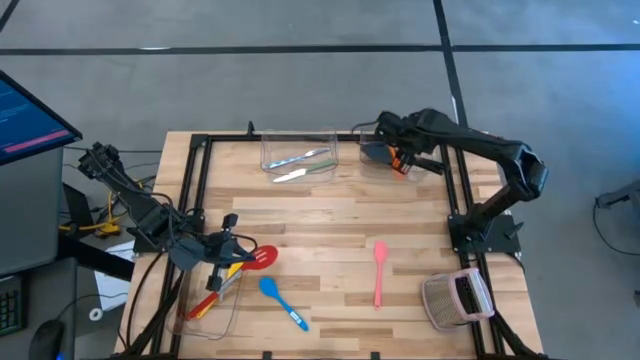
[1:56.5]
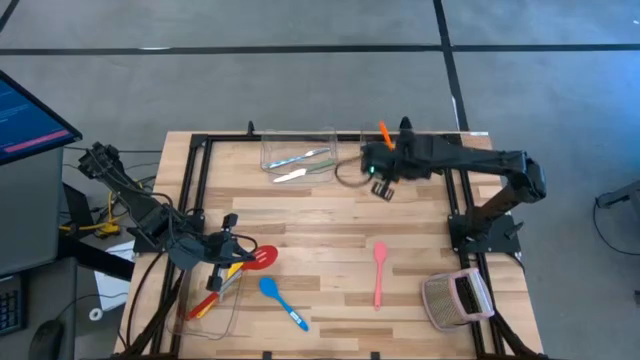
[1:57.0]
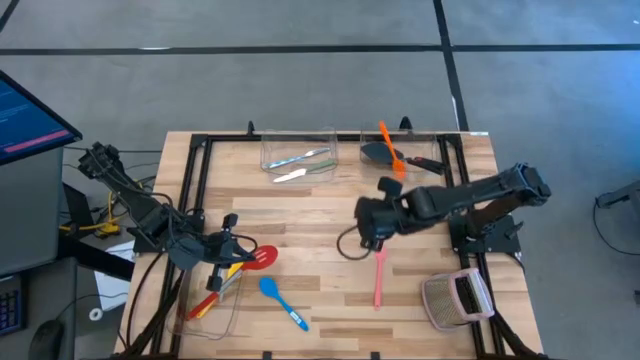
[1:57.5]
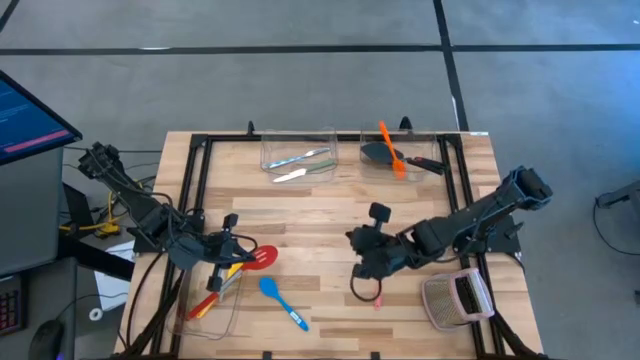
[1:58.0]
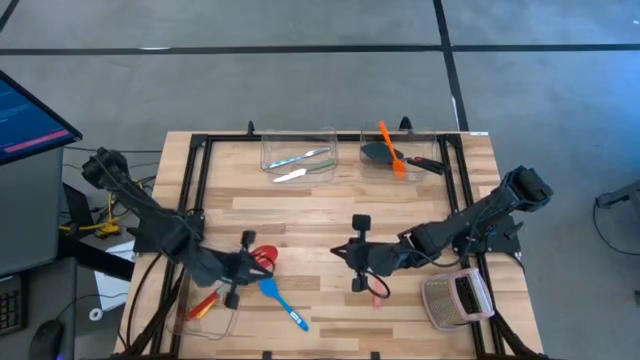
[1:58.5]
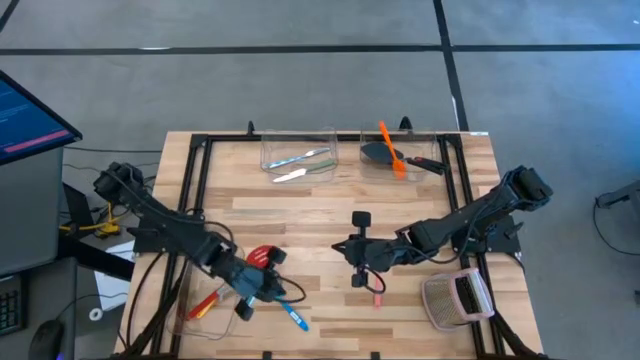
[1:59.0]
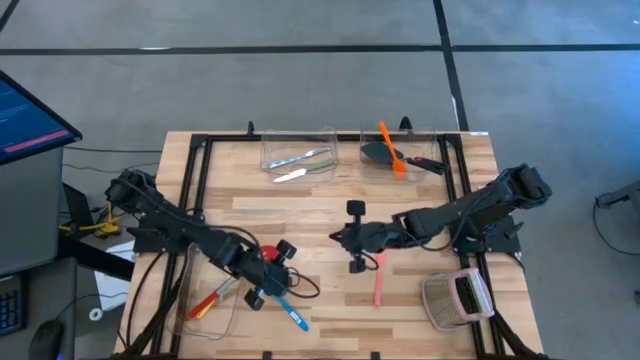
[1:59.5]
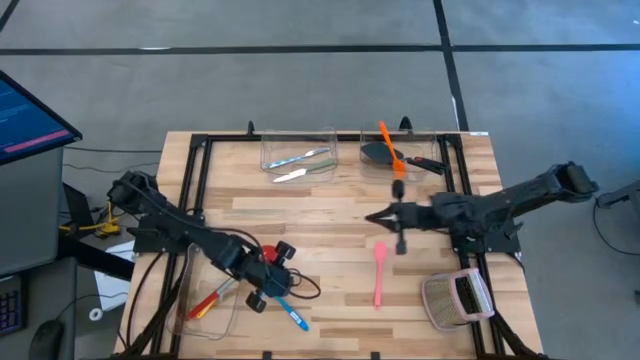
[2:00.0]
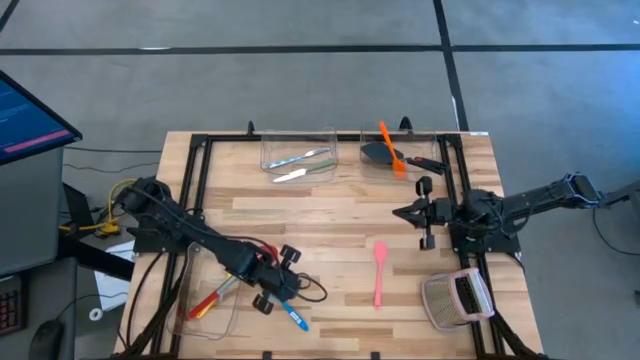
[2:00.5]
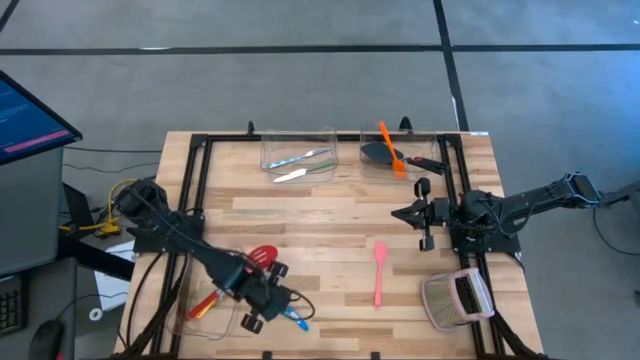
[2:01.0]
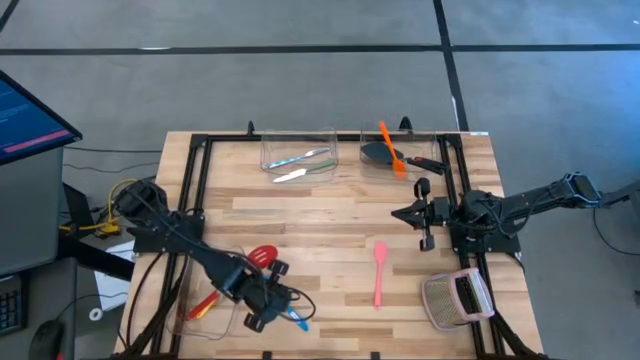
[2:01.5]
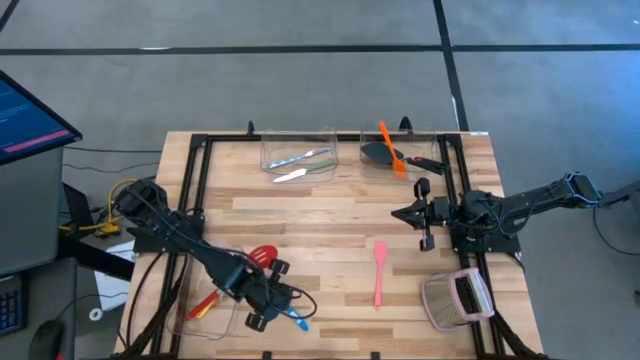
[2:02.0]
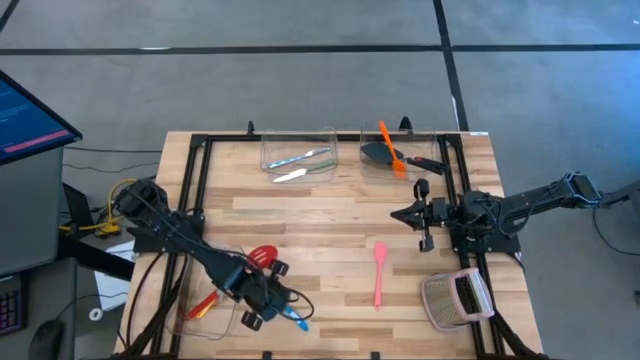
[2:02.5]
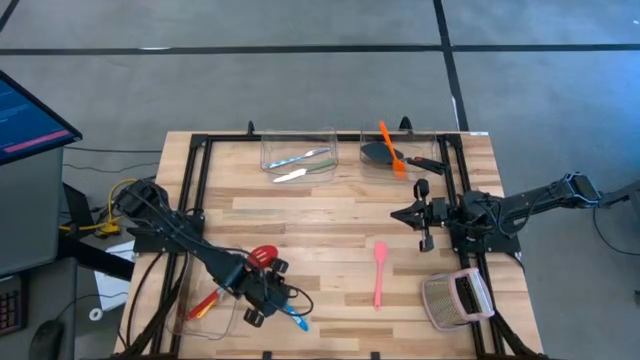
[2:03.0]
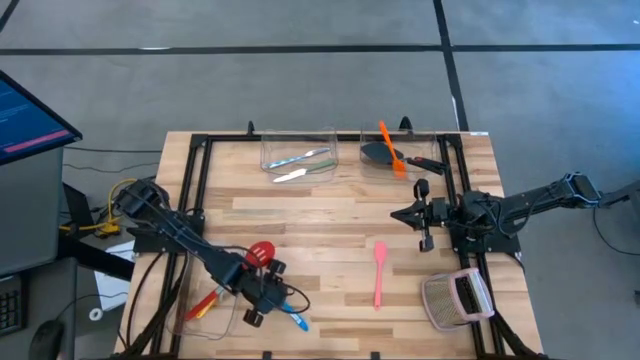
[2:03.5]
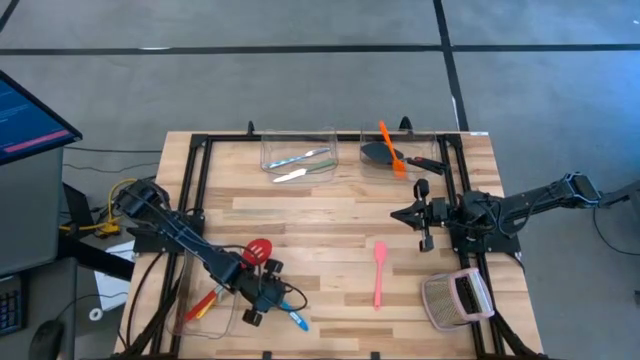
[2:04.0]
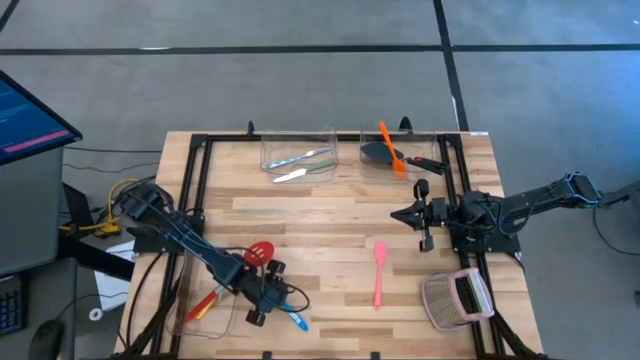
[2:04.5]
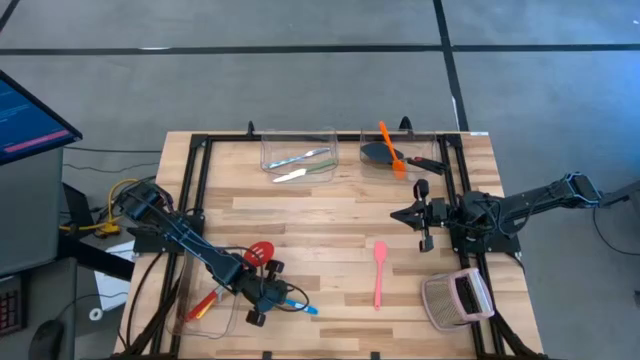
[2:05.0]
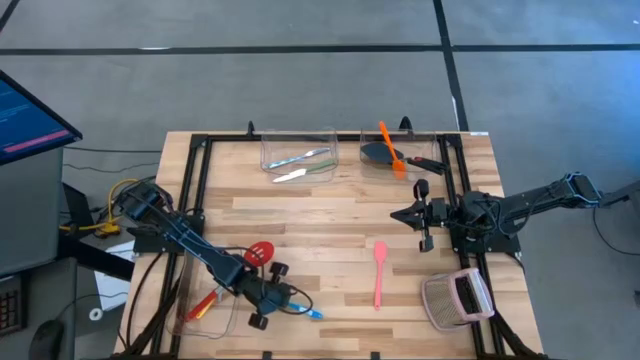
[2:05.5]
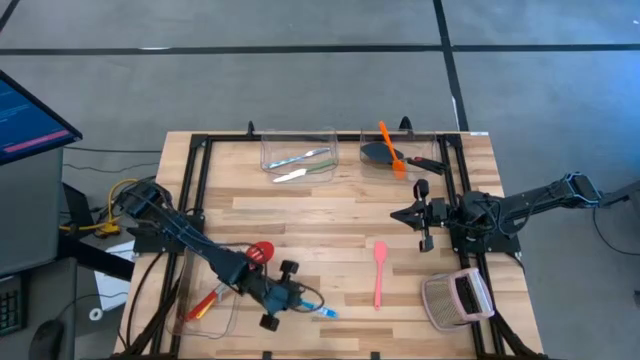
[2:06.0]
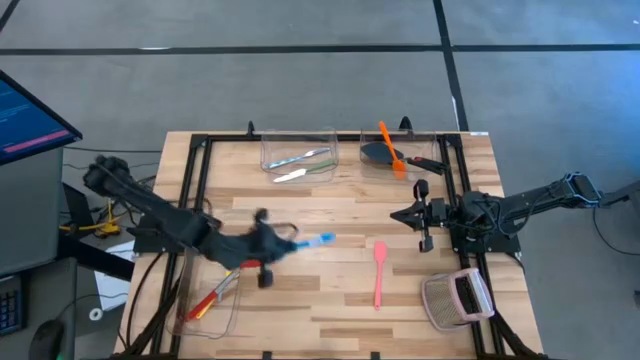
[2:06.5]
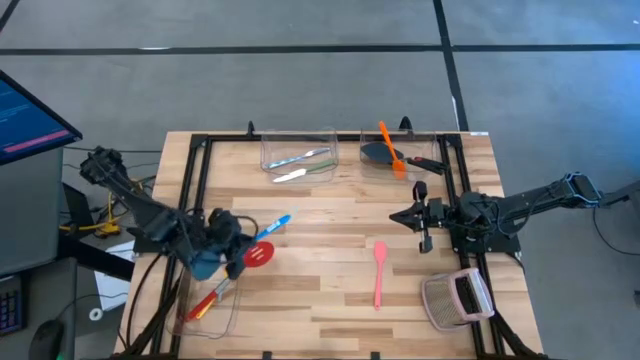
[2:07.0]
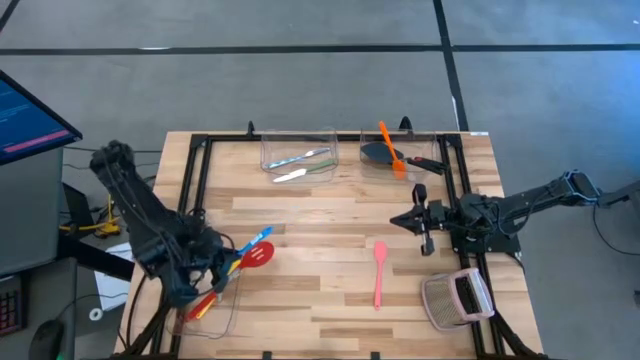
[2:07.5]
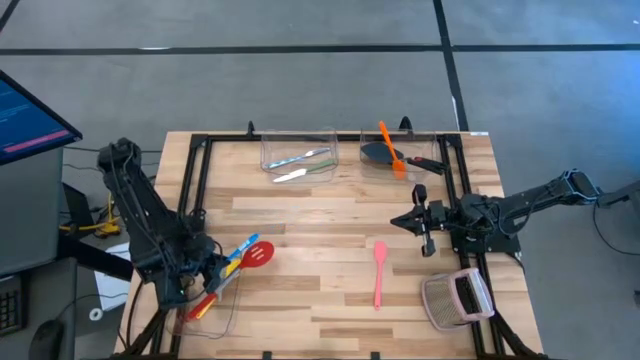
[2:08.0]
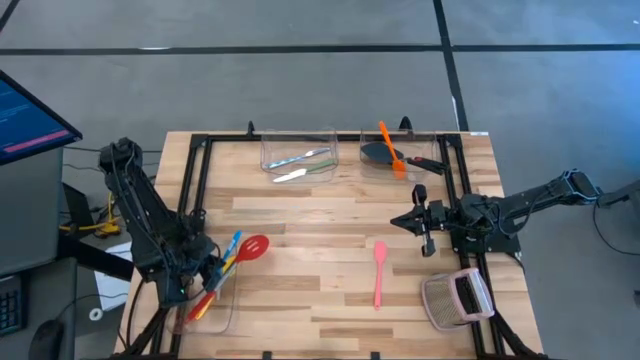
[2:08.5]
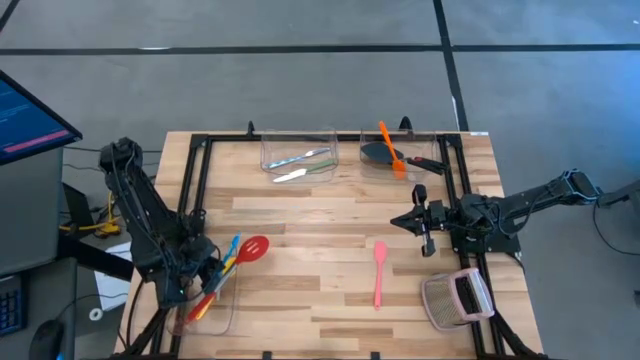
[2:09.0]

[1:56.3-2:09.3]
Task: Pick & Place Kitchen Items
Put the blue serving spoon into the bottom transparent bin

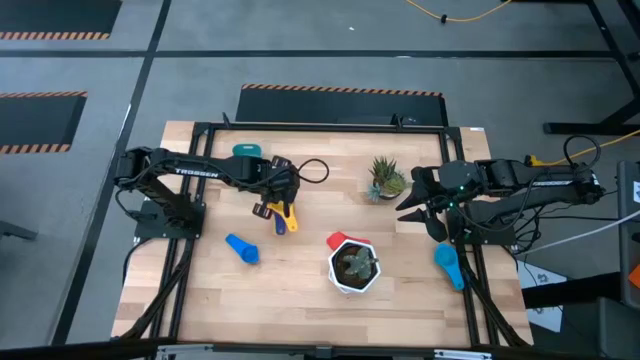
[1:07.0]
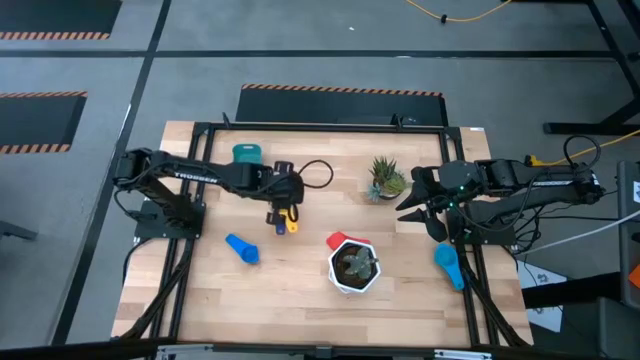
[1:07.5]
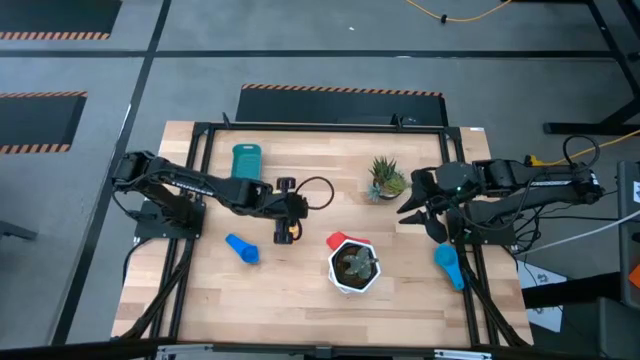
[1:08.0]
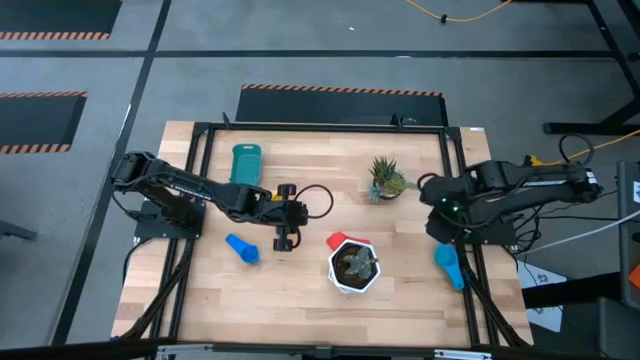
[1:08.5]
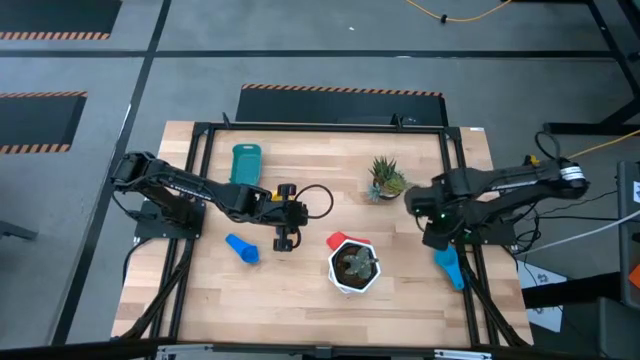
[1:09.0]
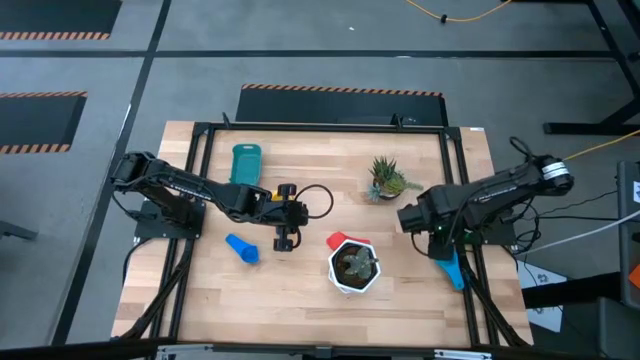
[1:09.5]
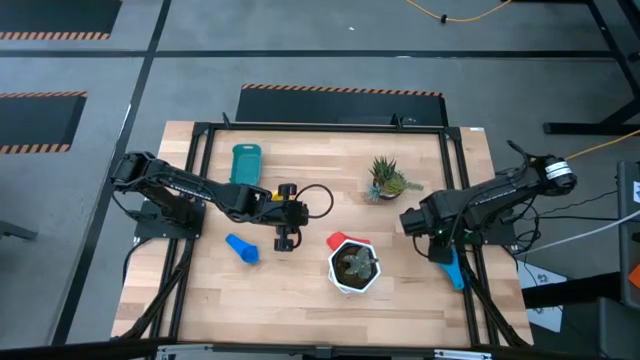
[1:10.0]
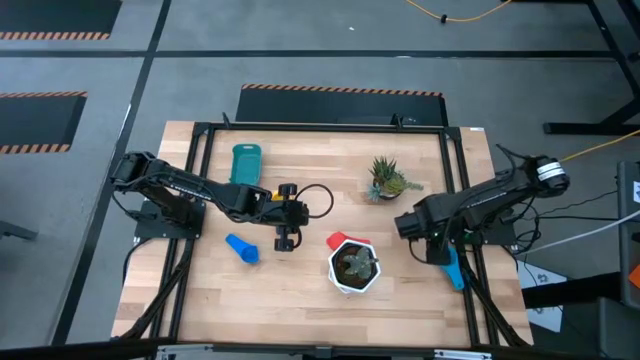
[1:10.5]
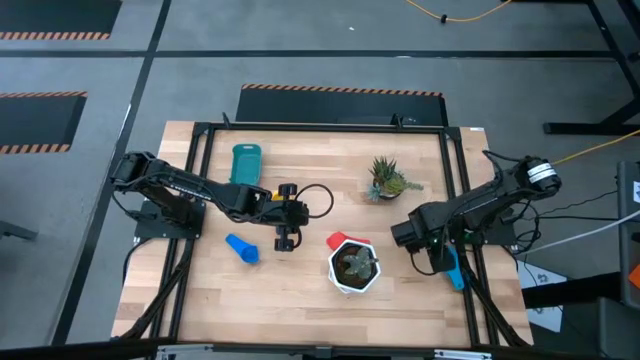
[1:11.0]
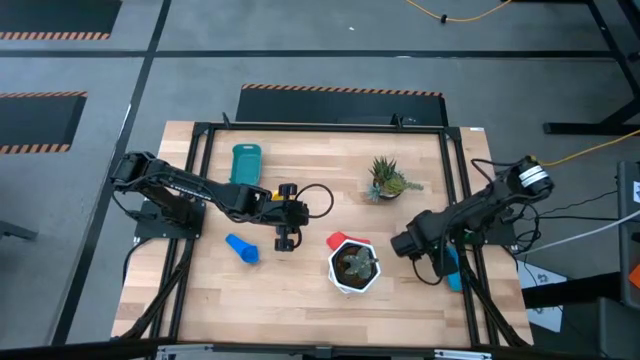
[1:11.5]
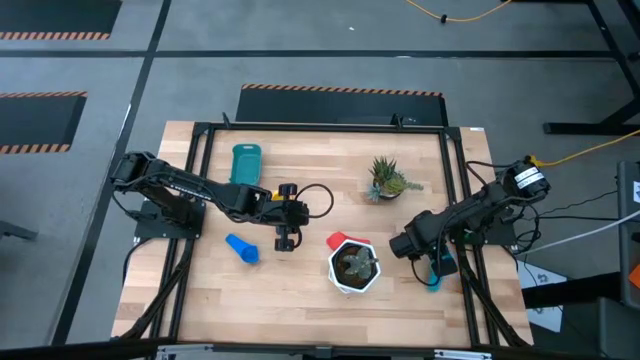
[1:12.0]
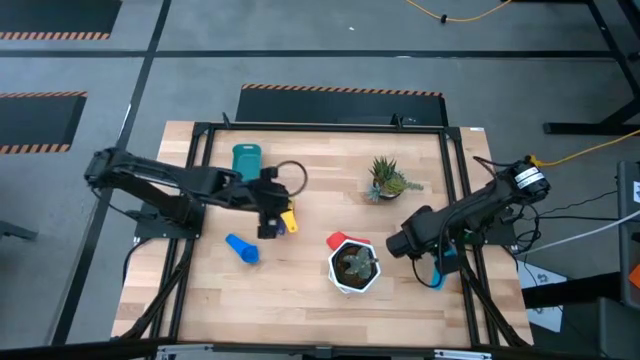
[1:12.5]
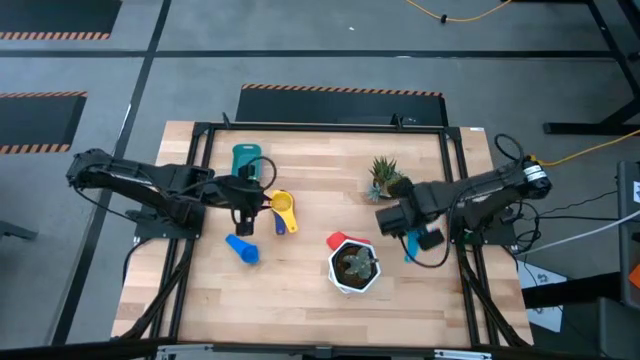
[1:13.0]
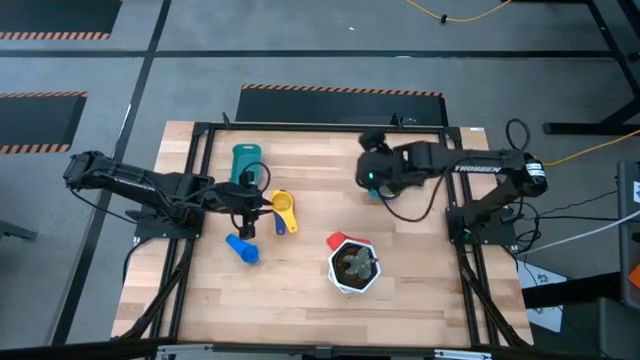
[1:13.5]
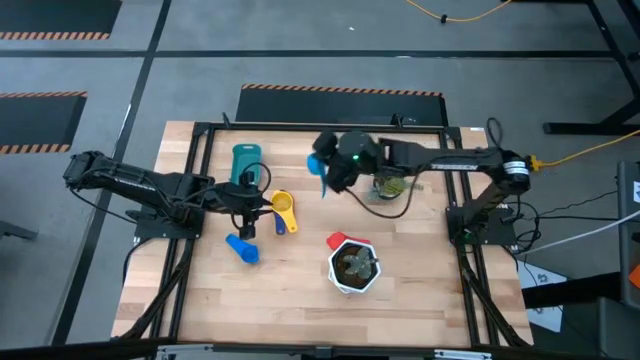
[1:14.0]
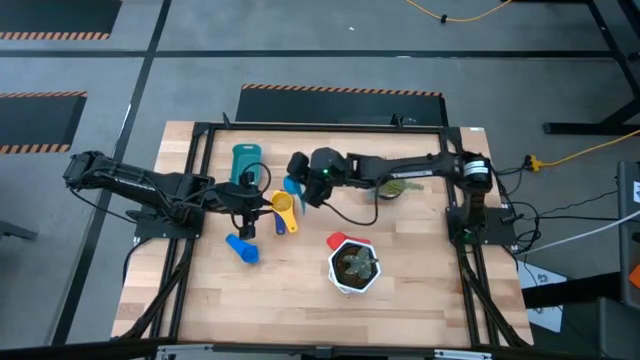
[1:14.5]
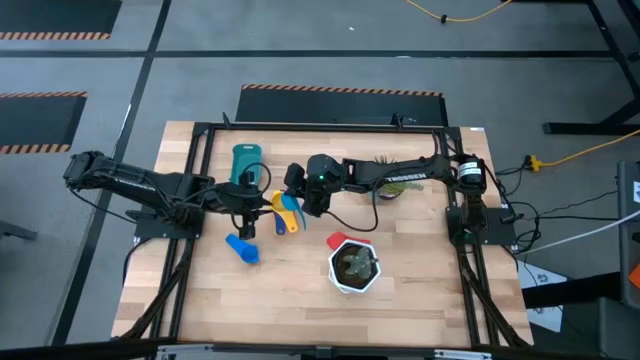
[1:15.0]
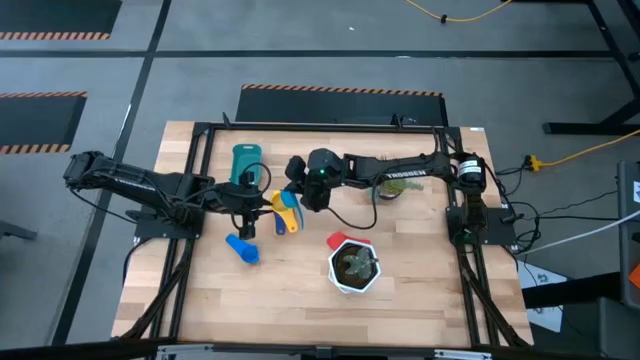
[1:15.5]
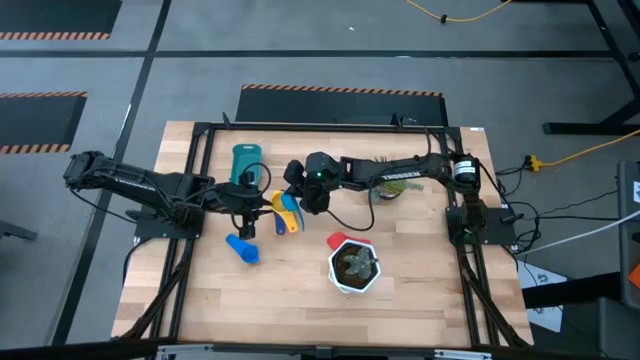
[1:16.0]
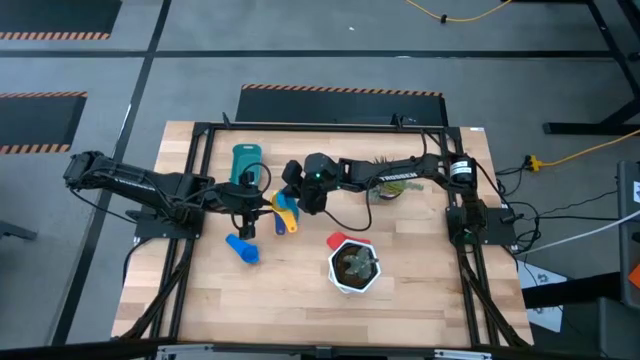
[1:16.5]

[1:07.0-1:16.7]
Task: Nest measuring cups in basket
Stack the light blue measuring cup into the yellow measuring cup
